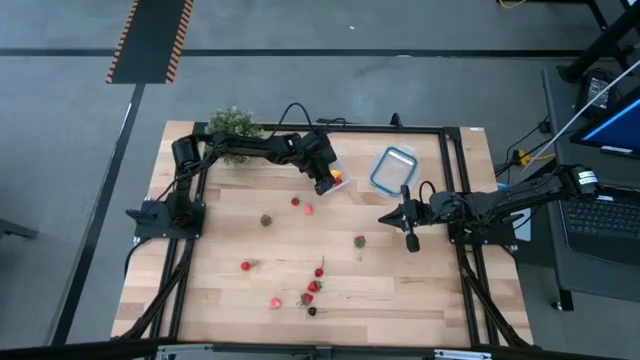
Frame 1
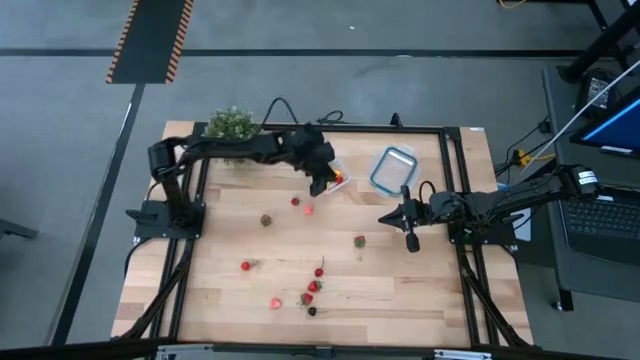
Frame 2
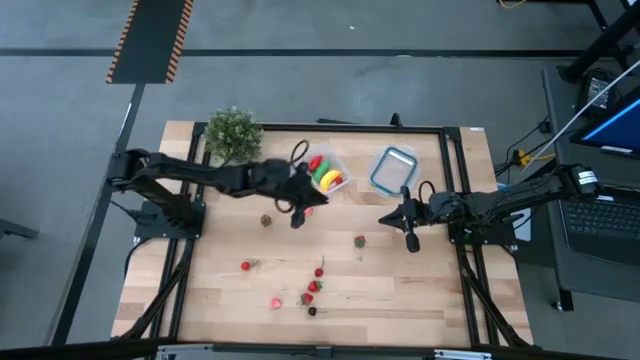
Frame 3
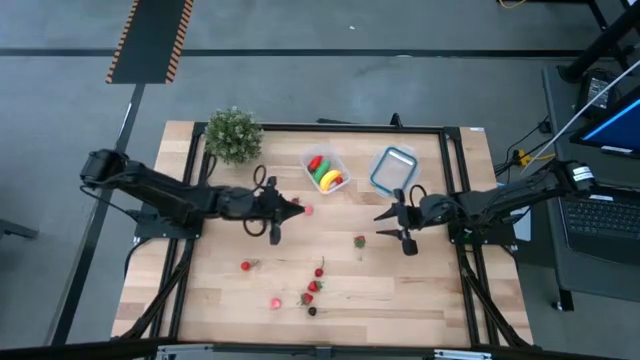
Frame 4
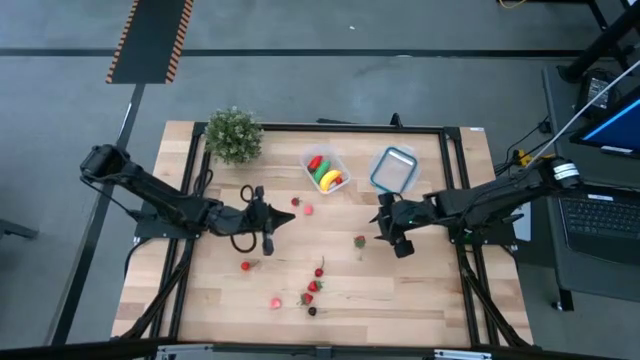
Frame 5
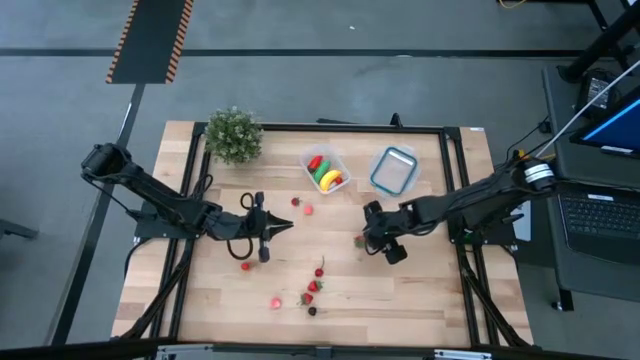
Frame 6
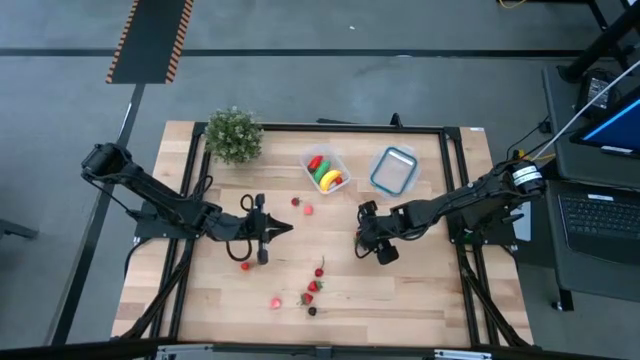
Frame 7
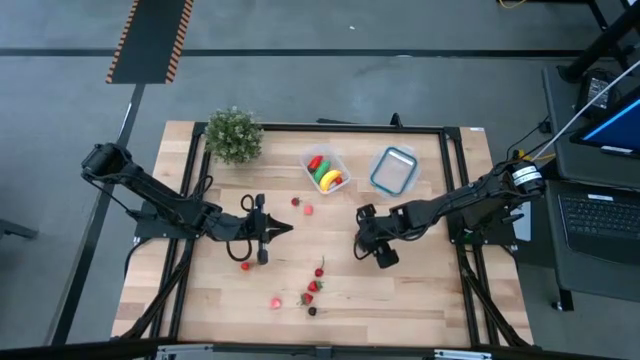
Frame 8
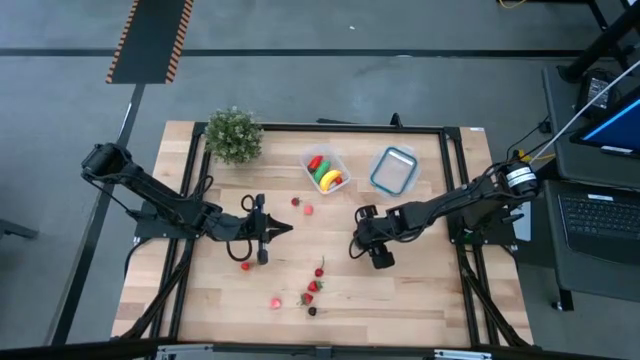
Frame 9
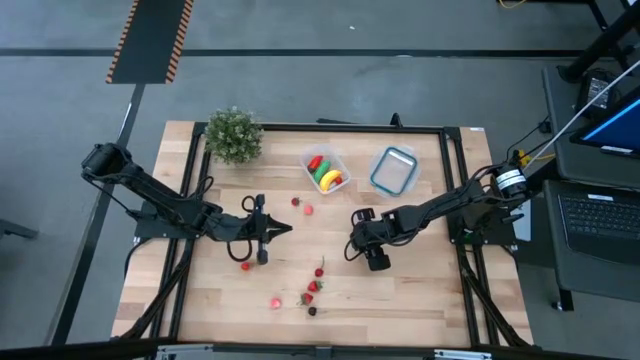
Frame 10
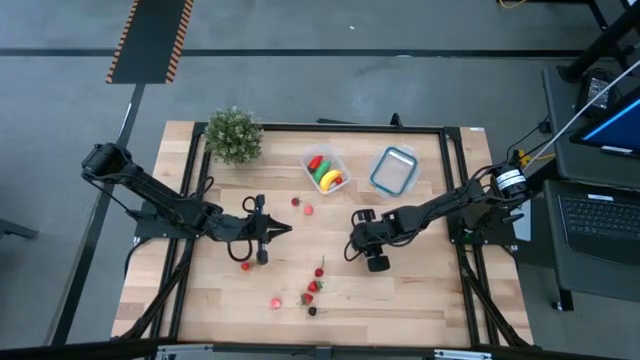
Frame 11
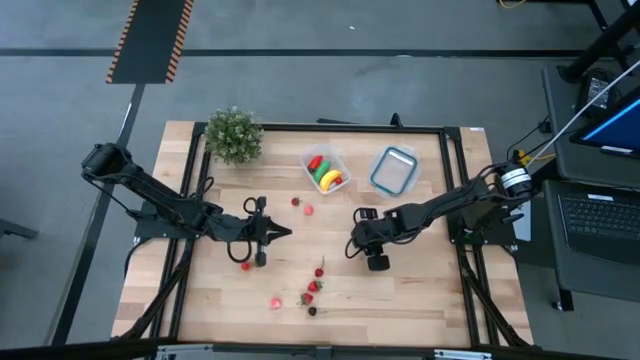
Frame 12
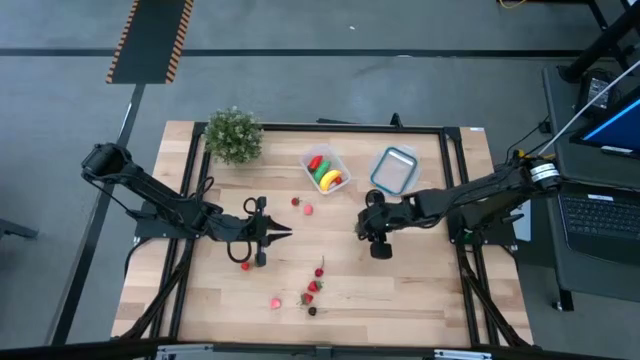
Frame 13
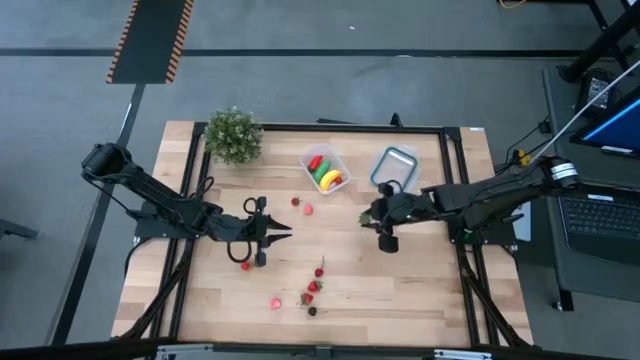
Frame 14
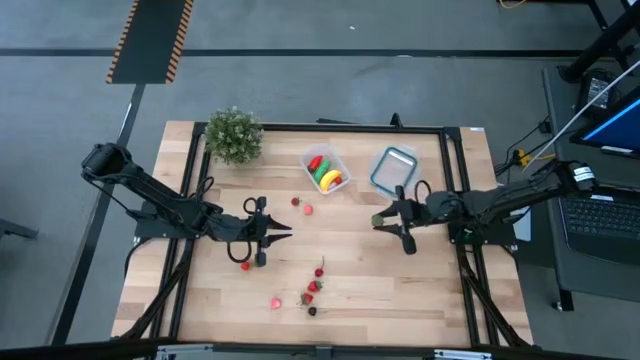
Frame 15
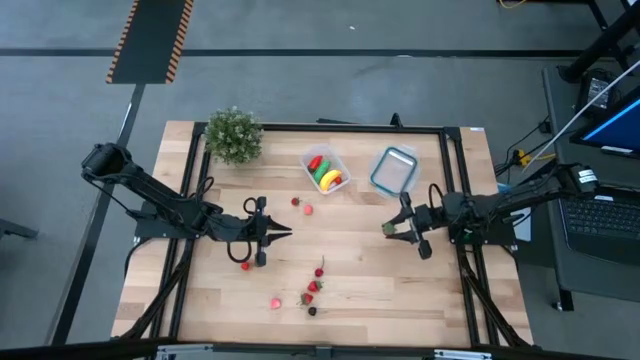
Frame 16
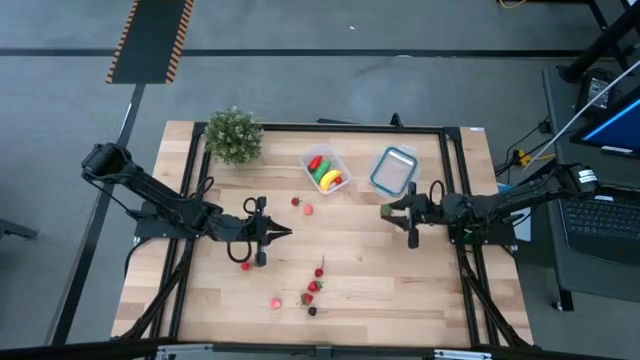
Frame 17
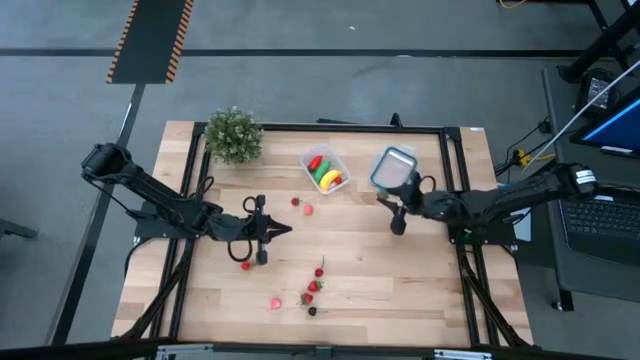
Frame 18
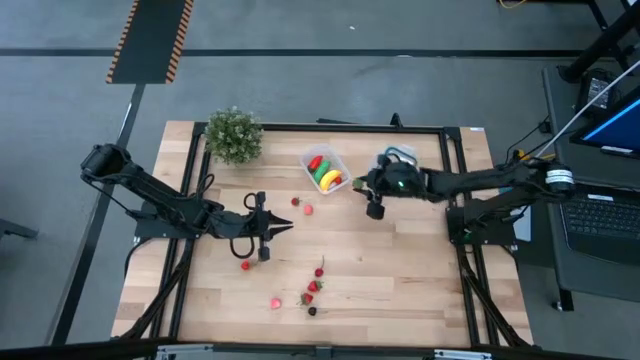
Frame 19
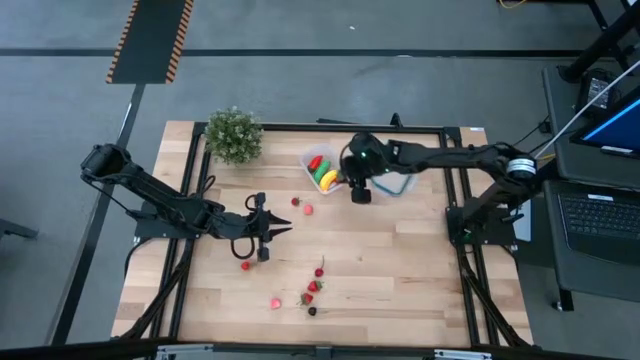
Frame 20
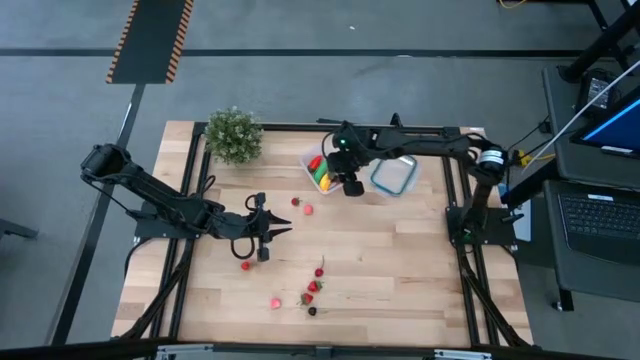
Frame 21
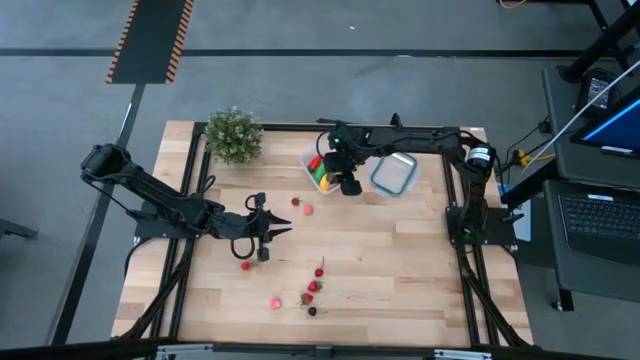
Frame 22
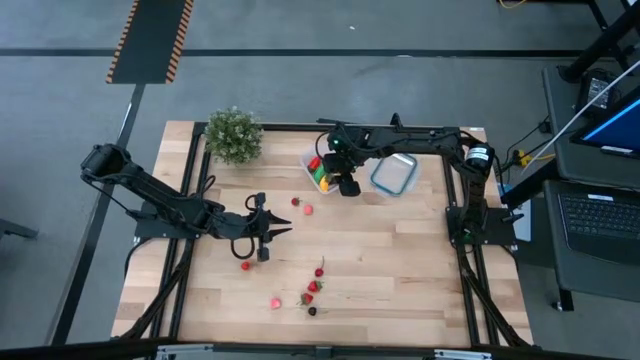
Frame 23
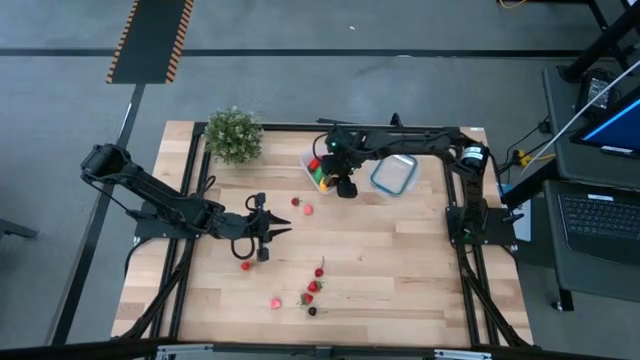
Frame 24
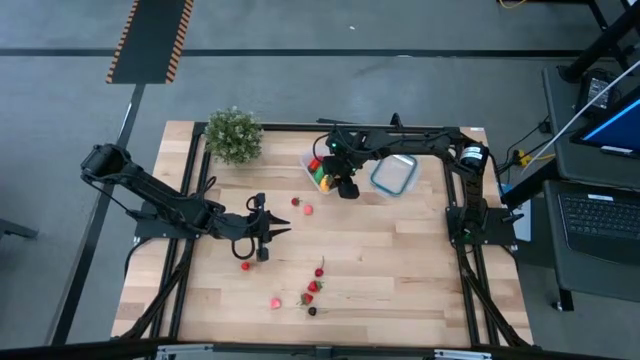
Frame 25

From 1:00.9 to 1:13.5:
Task: Pick and placing Produce into tupperware
Put the red strawberry into the transparent container

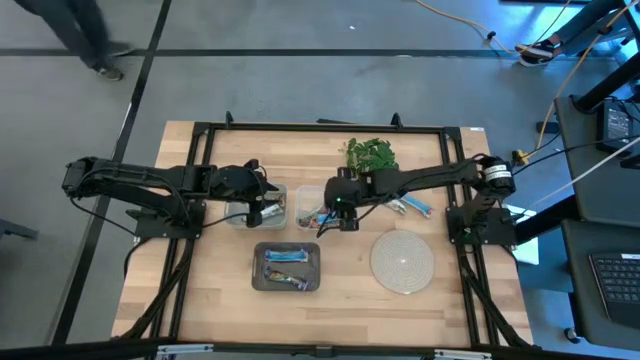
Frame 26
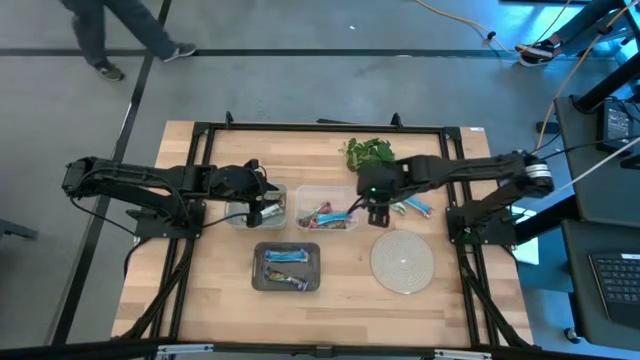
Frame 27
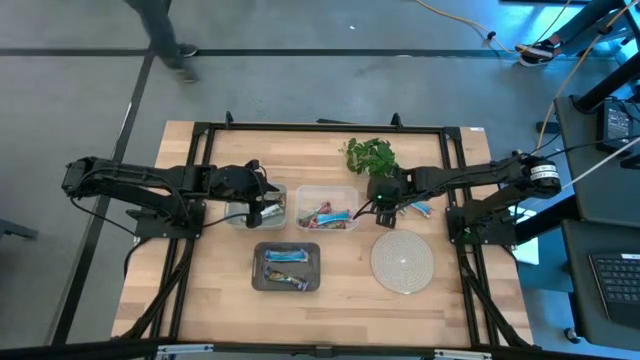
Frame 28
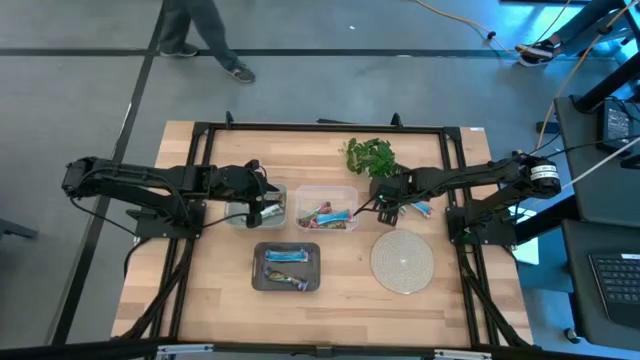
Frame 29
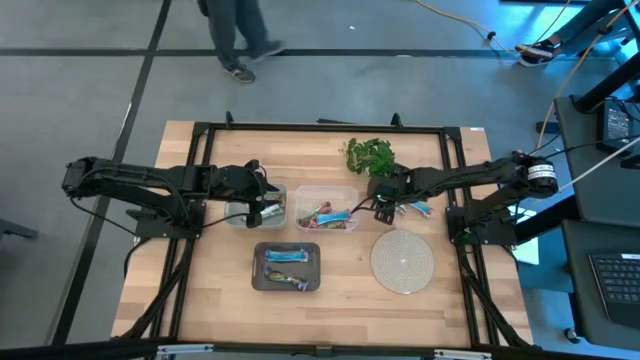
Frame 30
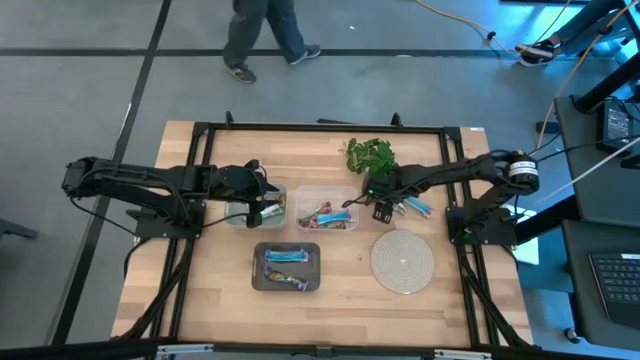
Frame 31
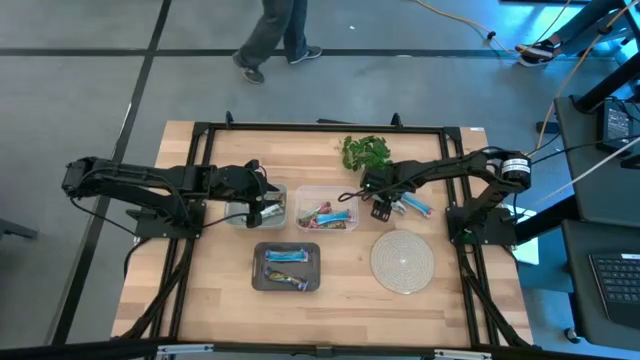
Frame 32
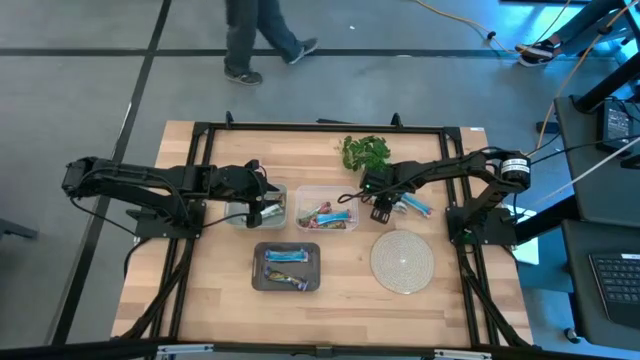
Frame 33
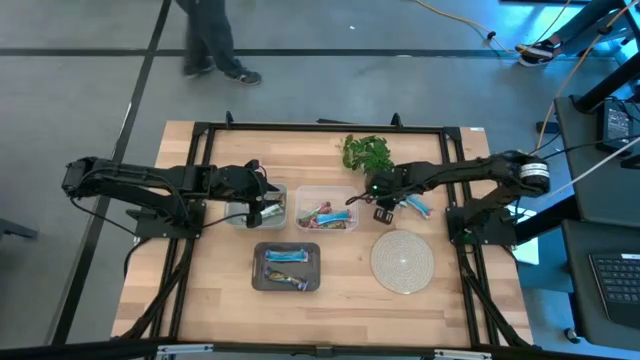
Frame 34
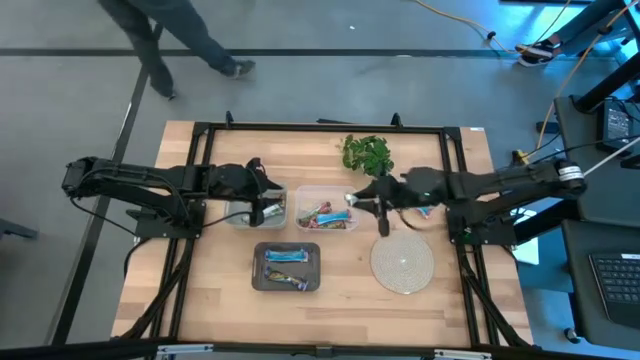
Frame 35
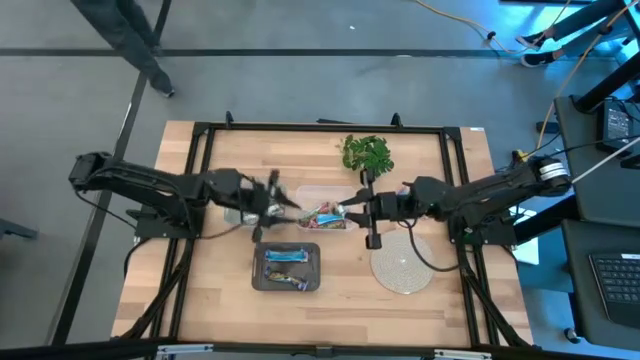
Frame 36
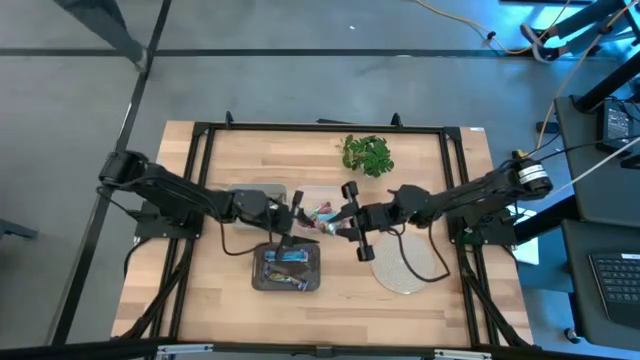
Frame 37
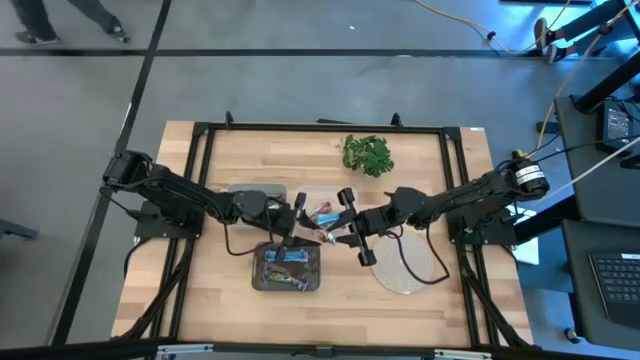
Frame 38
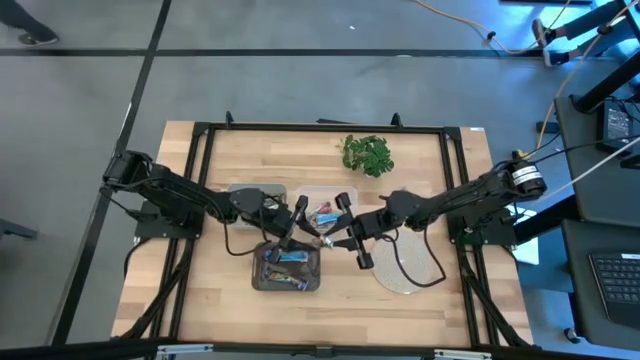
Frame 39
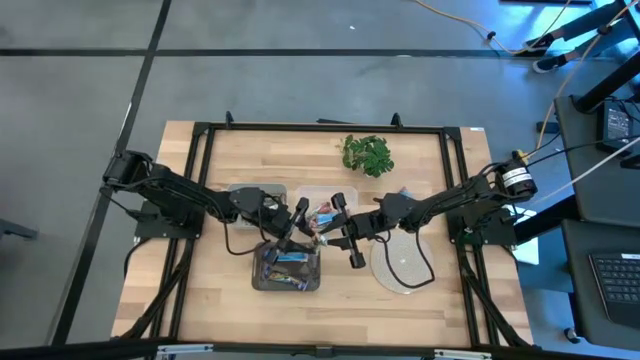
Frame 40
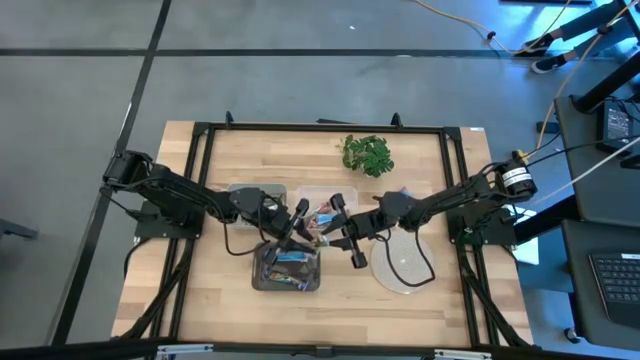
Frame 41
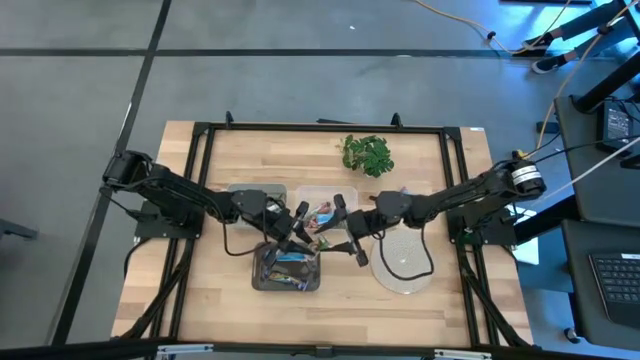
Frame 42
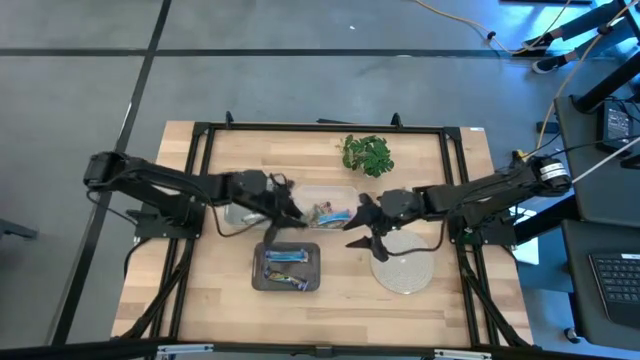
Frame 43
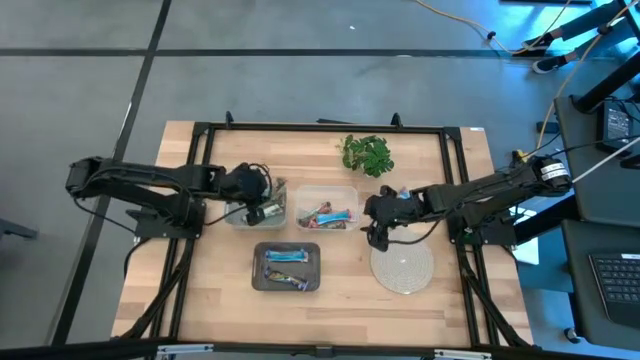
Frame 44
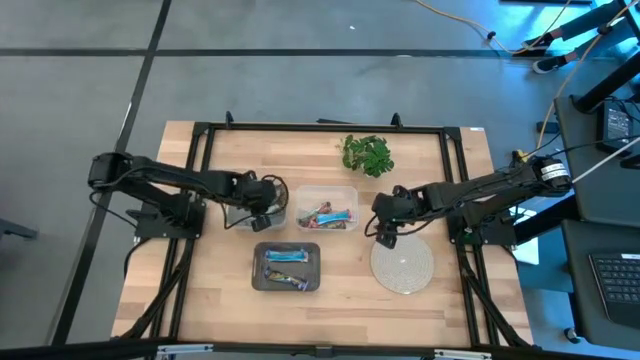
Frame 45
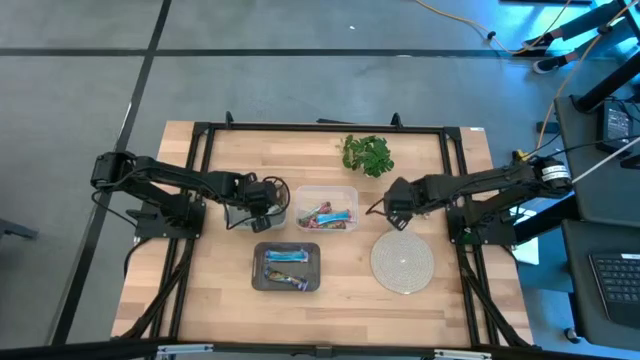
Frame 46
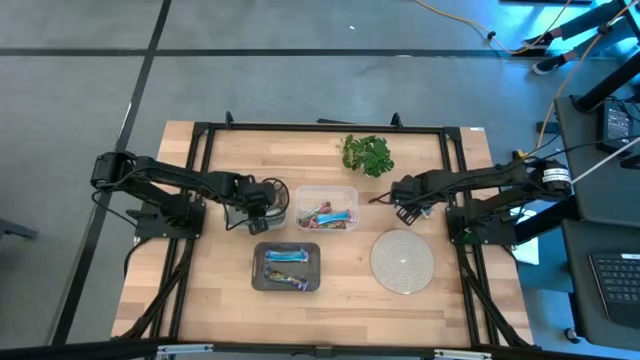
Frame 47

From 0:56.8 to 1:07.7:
Task: Pick and place Granola Bars by type
Put the yellow granola bar into the gray bin
